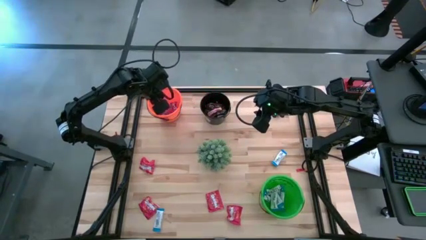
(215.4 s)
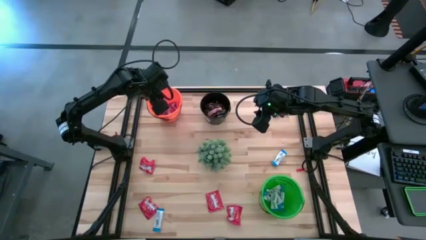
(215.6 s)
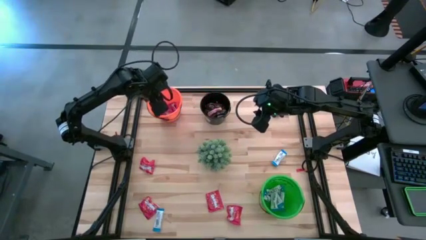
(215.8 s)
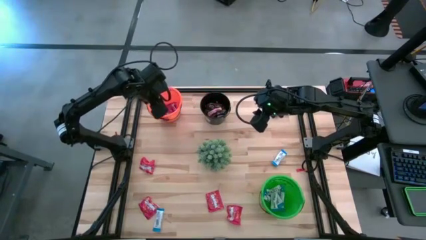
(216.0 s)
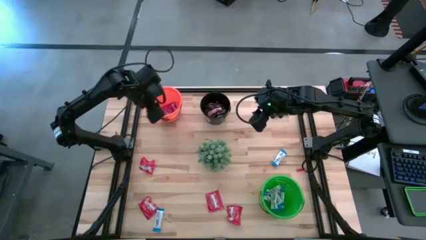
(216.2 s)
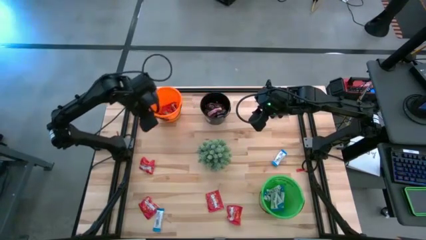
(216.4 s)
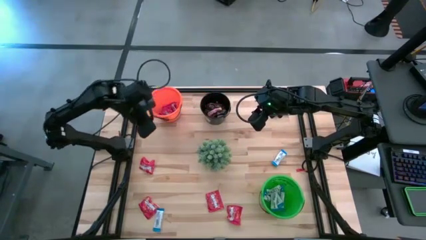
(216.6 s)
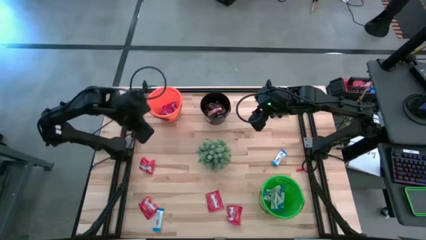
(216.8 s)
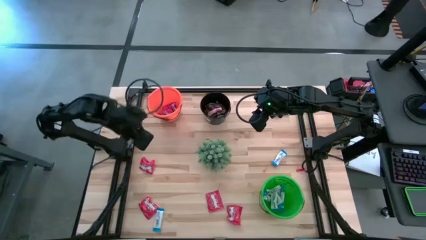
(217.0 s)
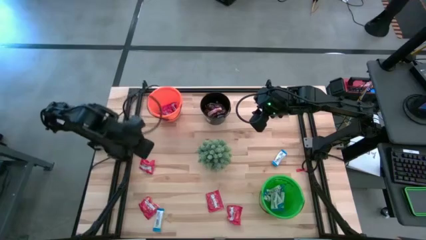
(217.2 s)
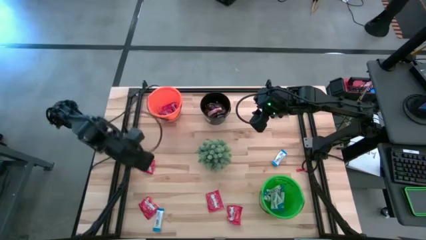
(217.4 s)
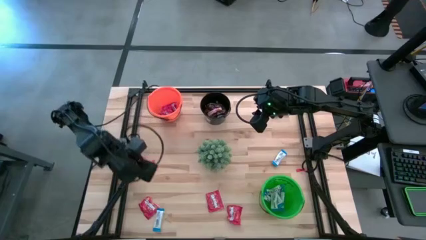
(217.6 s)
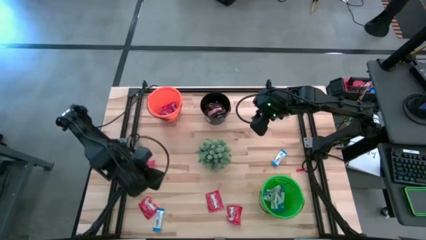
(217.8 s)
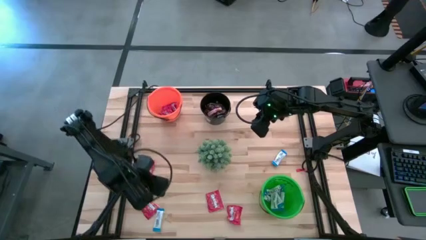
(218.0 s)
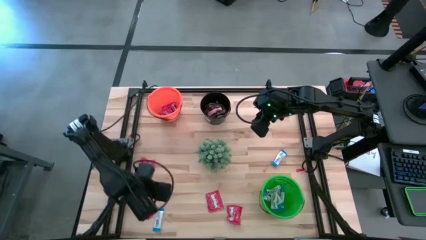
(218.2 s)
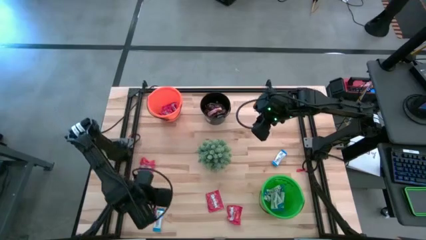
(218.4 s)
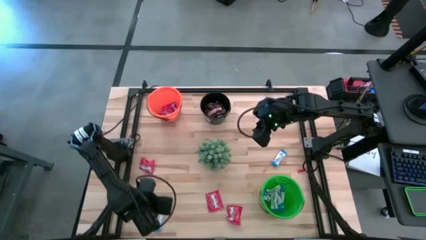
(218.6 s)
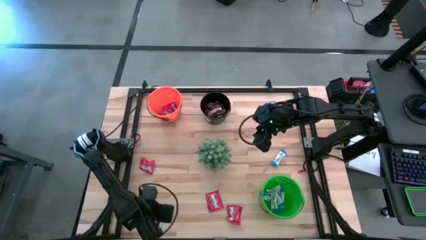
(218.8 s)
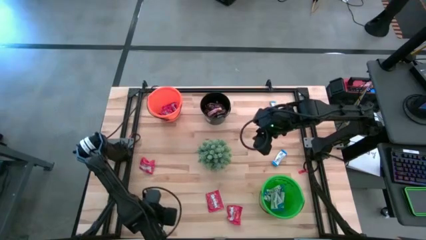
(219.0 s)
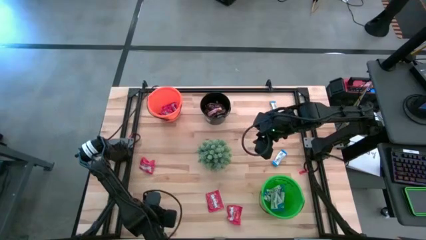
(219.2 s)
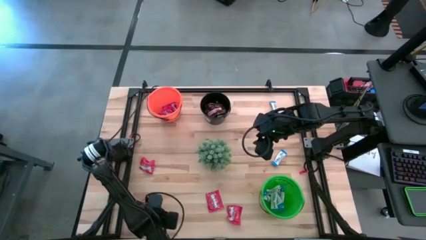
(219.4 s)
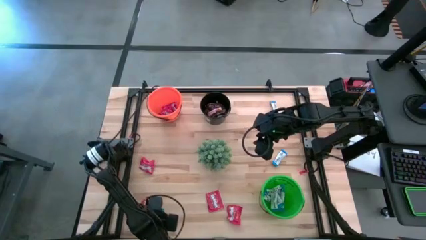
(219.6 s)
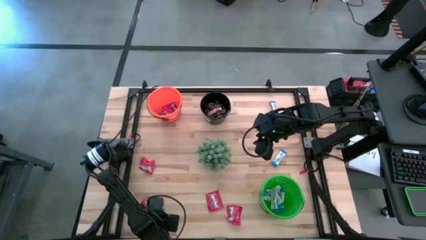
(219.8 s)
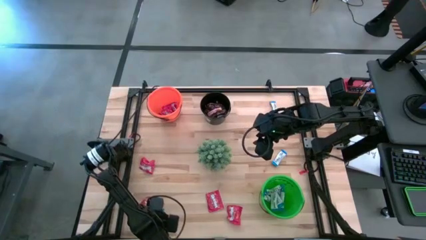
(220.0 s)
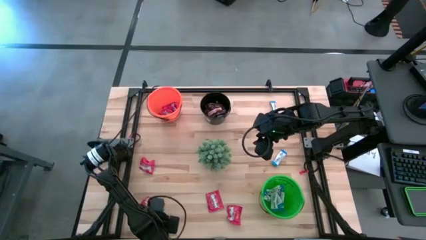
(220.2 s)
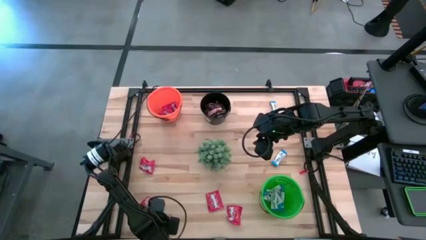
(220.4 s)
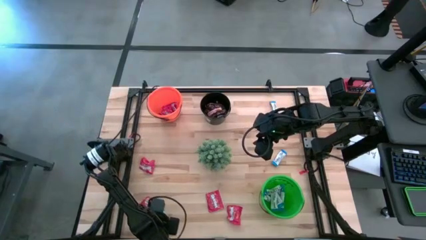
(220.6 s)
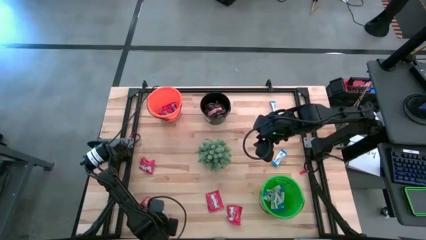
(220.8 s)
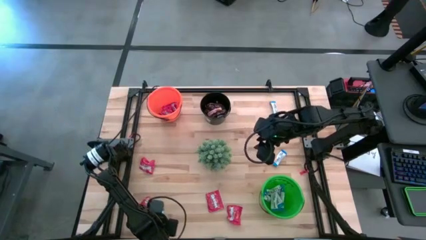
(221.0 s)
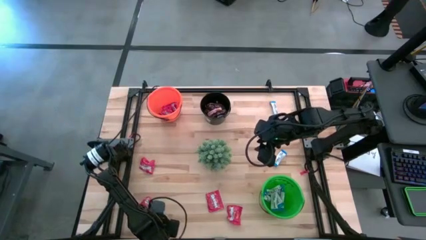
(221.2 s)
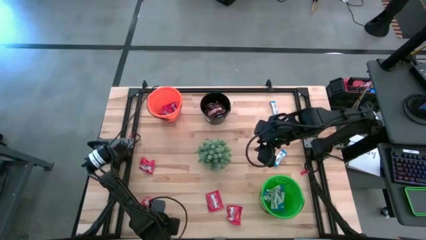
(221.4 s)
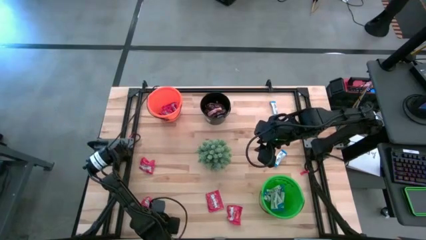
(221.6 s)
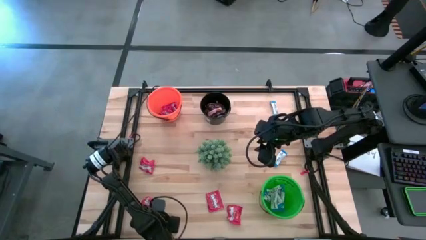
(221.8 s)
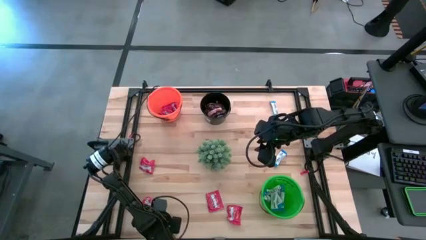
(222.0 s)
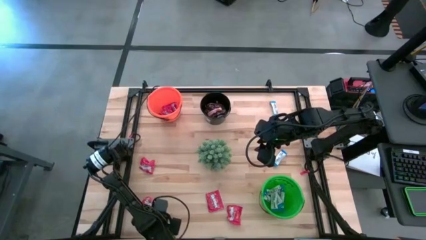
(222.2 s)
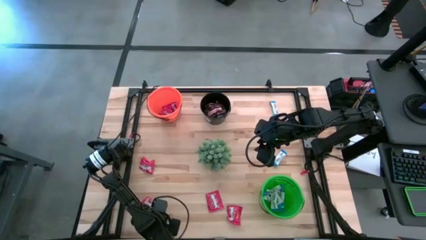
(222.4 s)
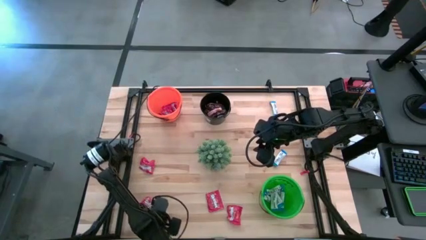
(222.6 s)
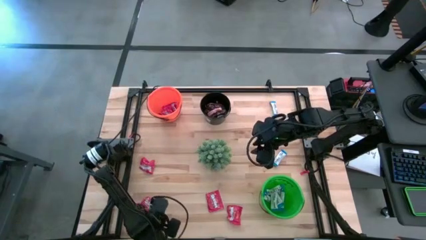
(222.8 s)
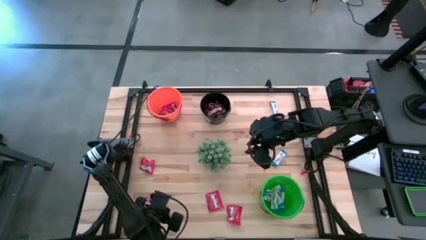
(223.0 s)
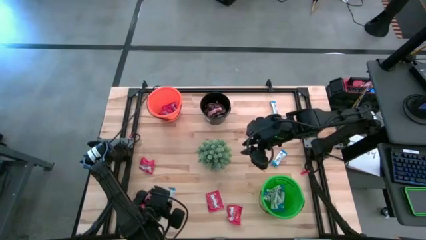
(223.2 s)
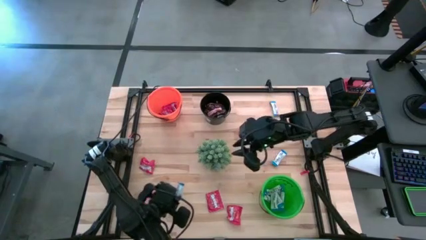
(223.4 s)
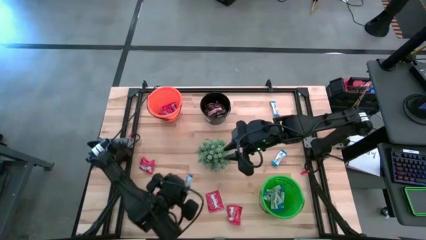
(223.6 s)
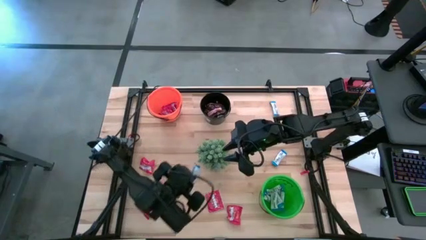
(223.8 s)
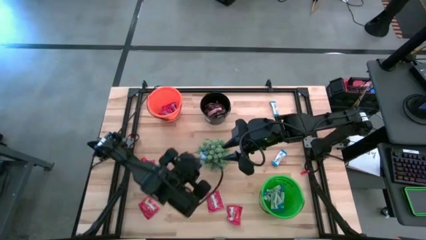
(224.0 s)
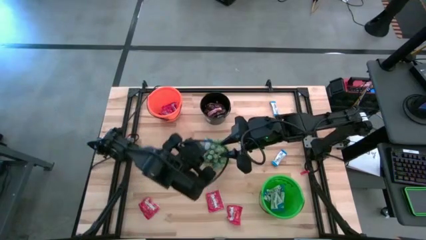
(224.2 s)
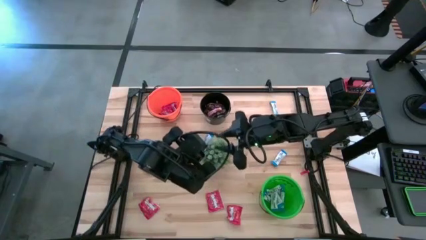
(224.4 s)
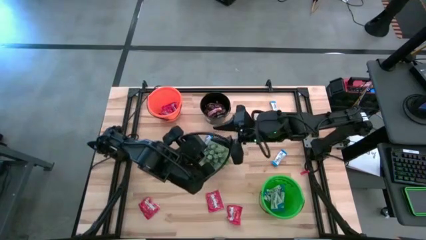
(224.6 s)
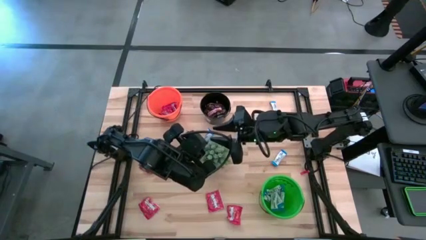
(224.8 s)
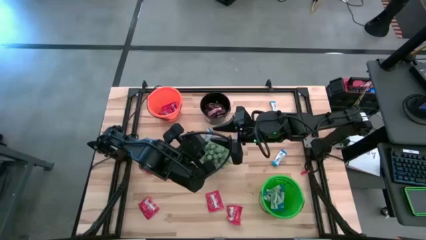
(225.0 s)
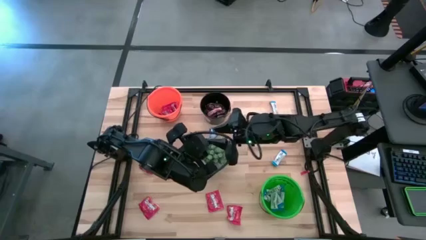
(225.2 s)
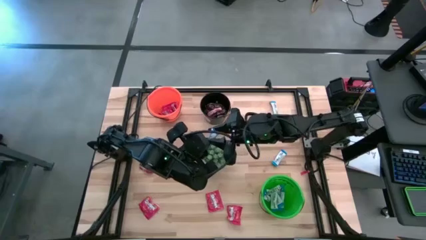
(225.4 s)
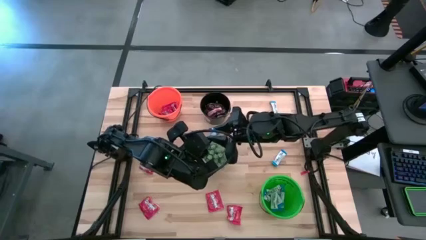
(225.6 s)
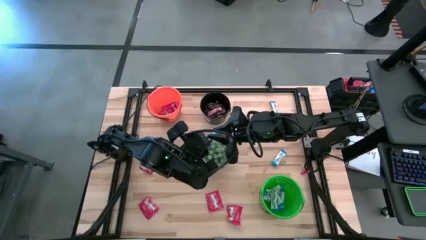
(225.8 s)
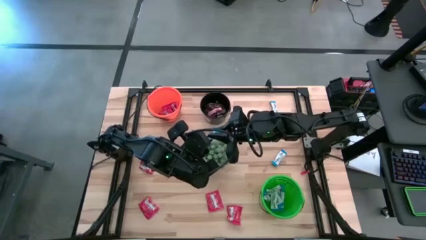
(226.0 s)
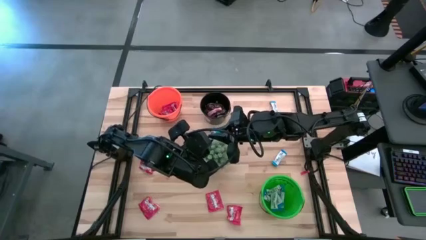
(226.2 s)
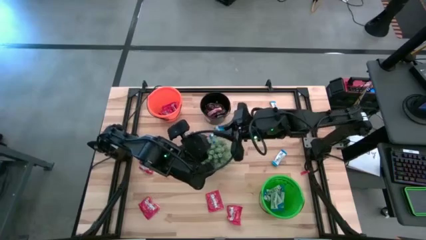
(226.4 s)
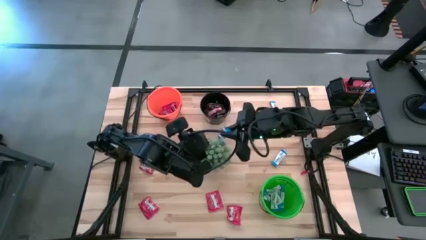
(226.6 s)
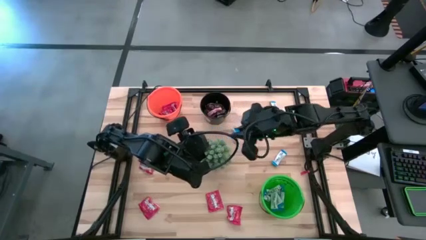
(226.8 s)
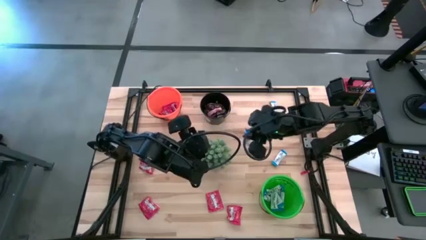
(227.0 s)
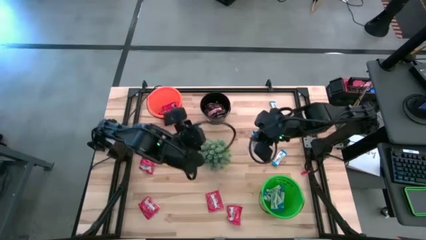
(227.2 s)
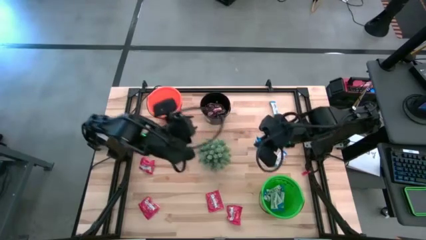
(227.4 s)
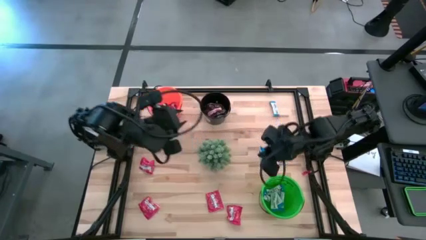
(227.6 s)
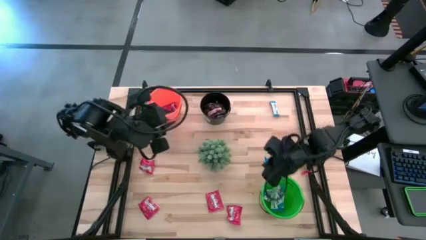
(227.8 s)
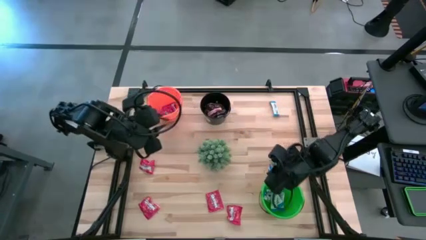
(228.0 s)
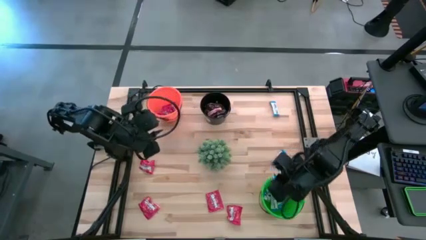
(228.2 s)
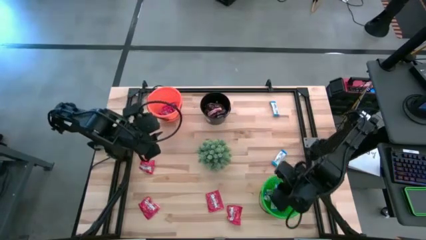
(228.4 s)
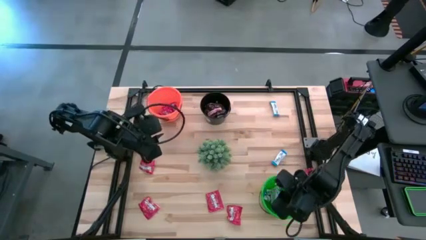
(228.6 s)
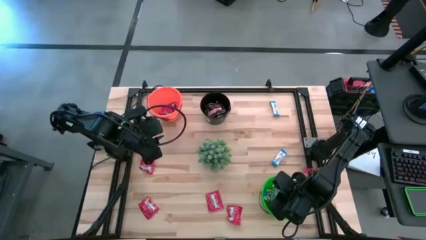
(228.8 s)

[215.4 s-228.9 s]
Task: Sort candy
Put the blue chocolate into the green bucket
